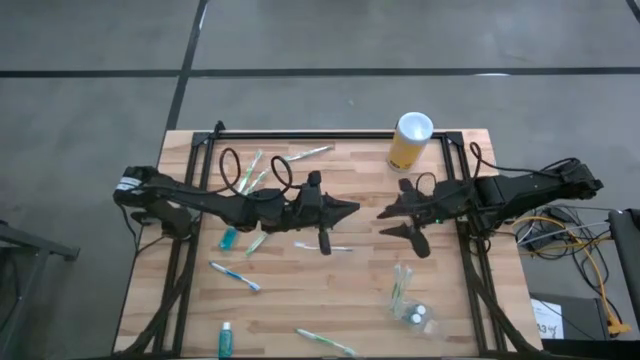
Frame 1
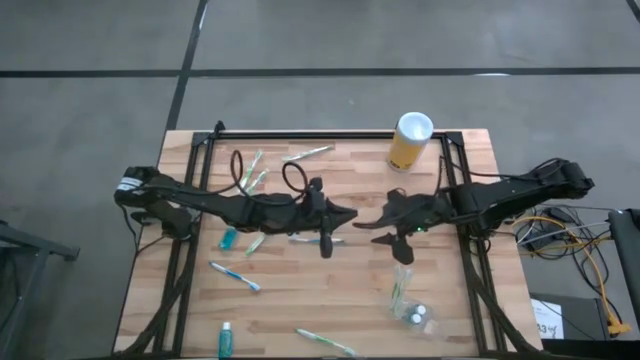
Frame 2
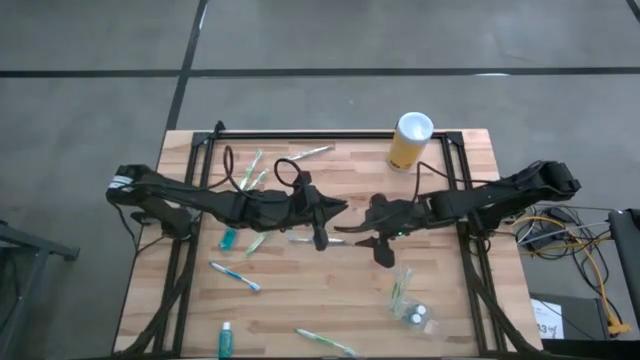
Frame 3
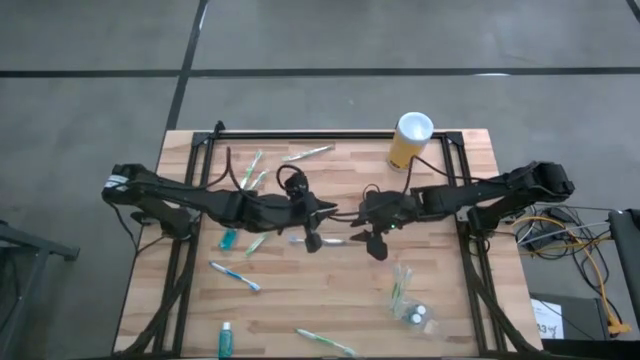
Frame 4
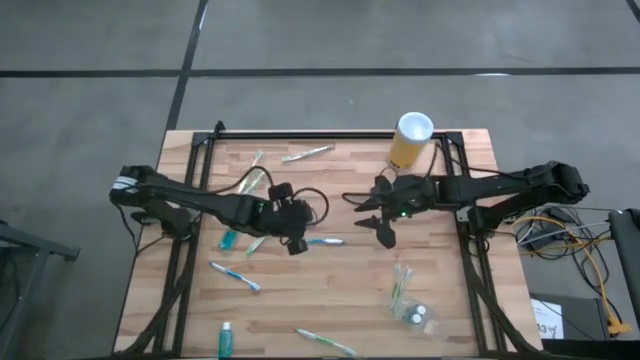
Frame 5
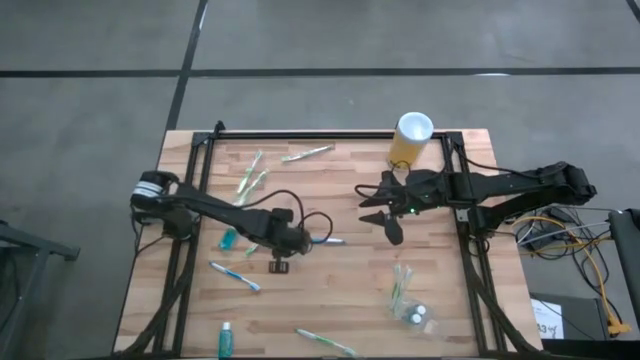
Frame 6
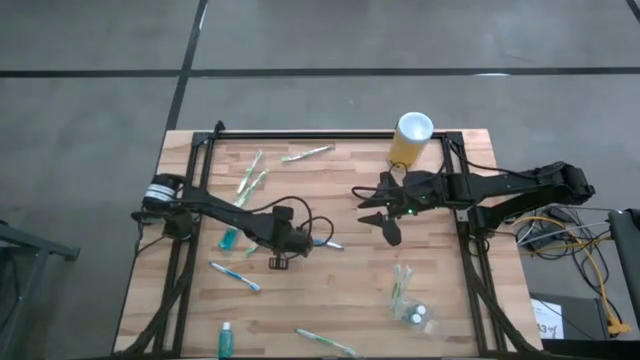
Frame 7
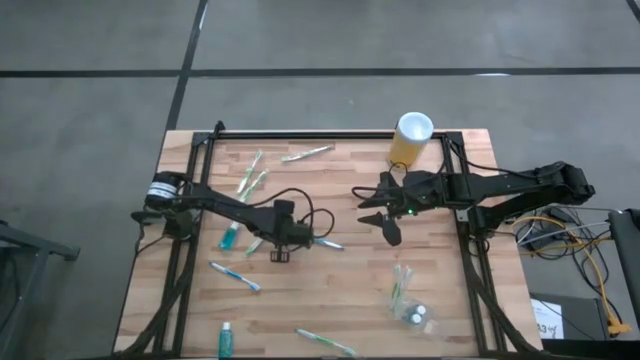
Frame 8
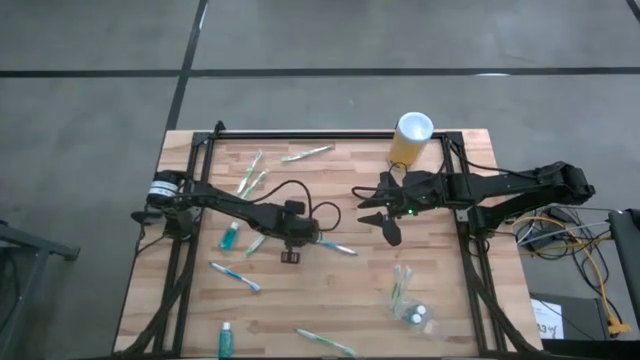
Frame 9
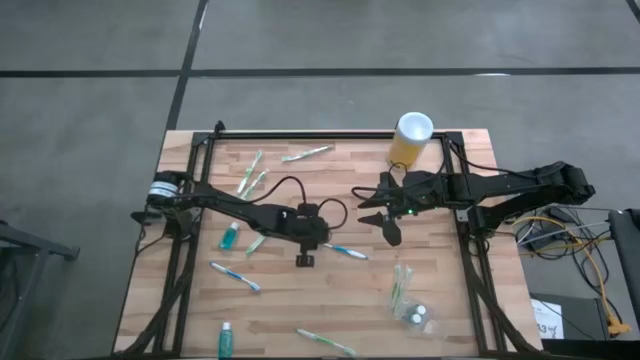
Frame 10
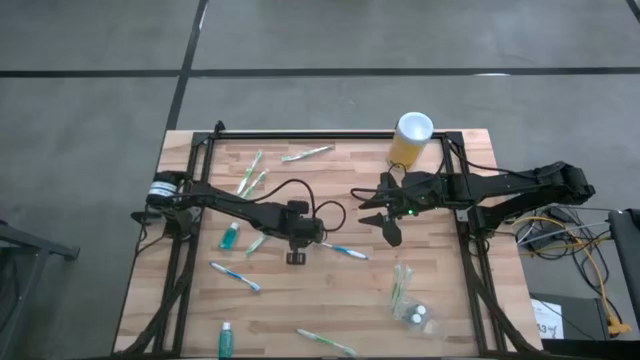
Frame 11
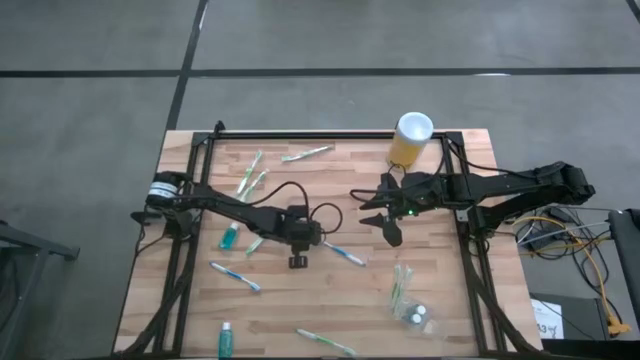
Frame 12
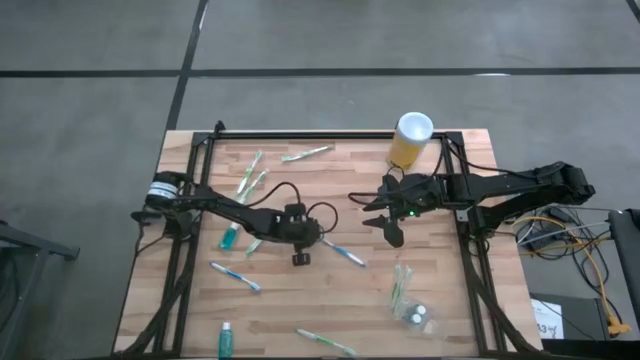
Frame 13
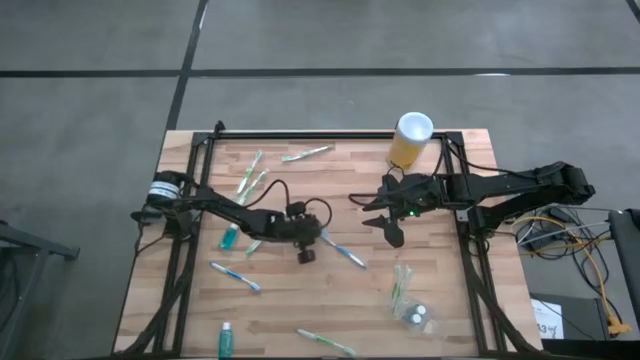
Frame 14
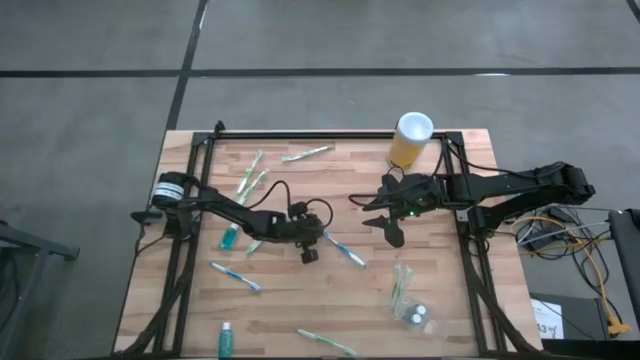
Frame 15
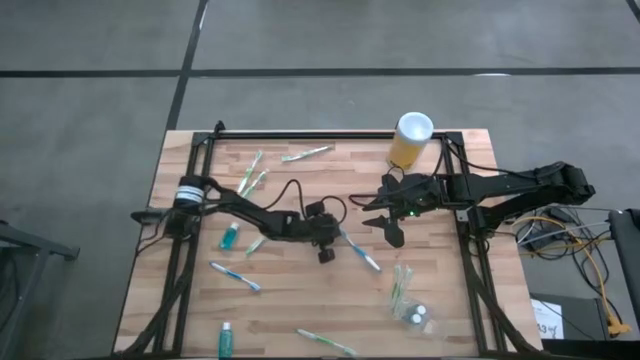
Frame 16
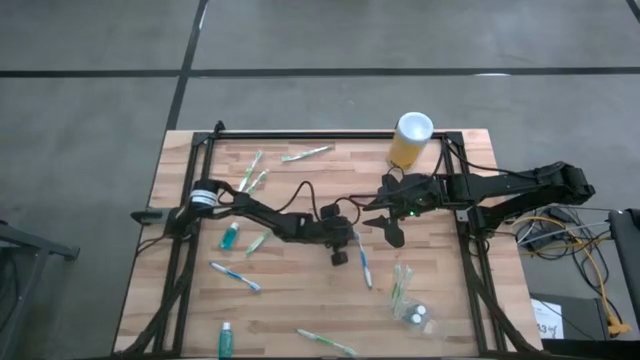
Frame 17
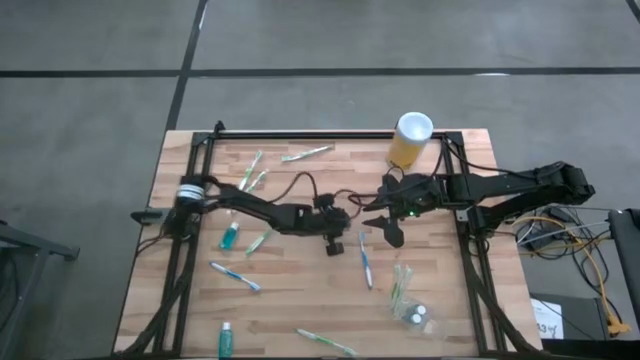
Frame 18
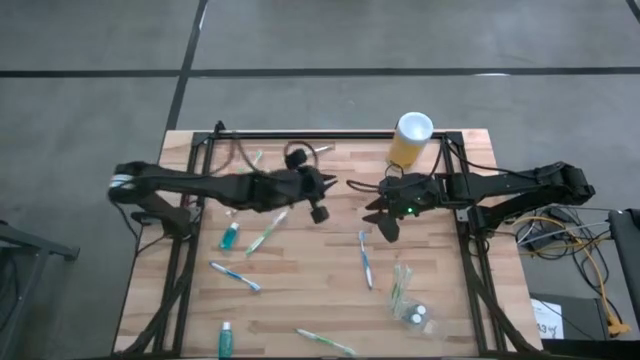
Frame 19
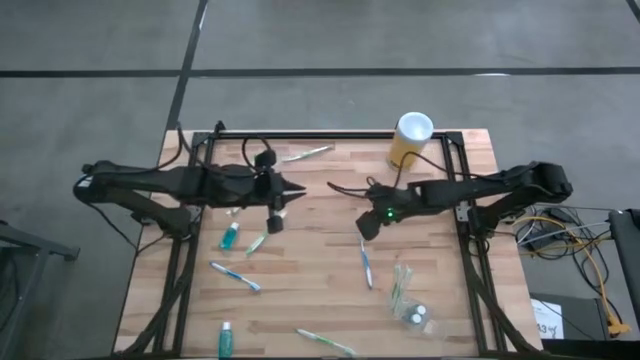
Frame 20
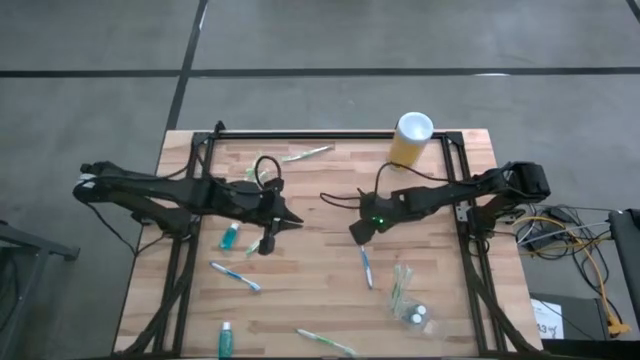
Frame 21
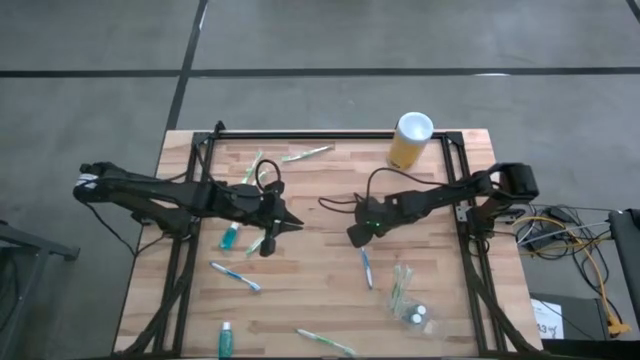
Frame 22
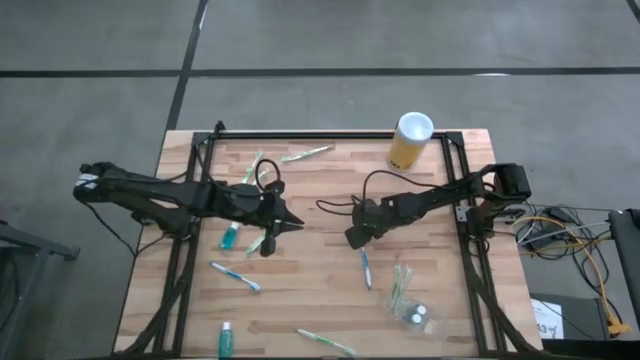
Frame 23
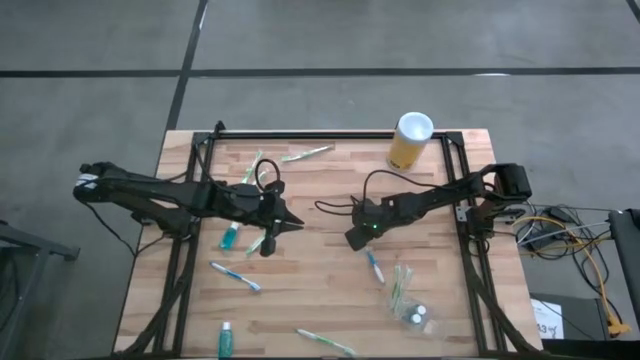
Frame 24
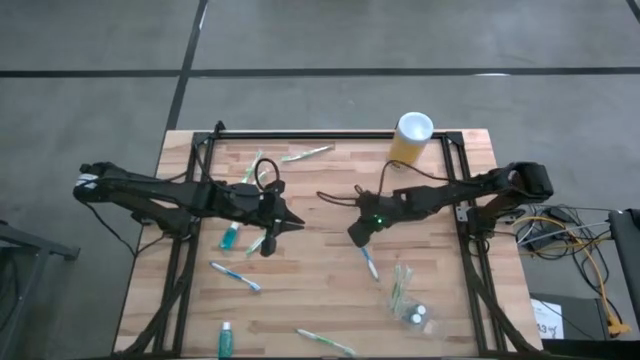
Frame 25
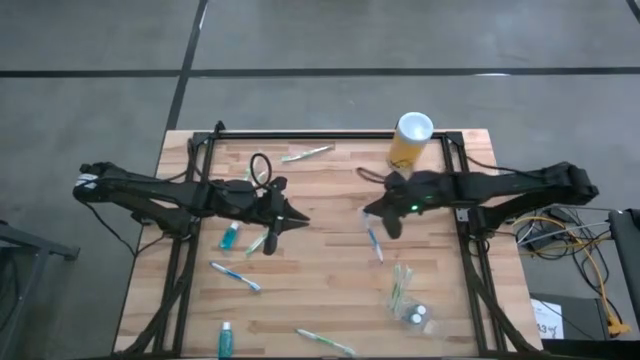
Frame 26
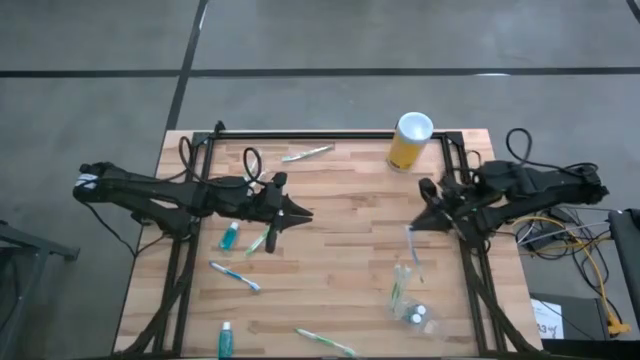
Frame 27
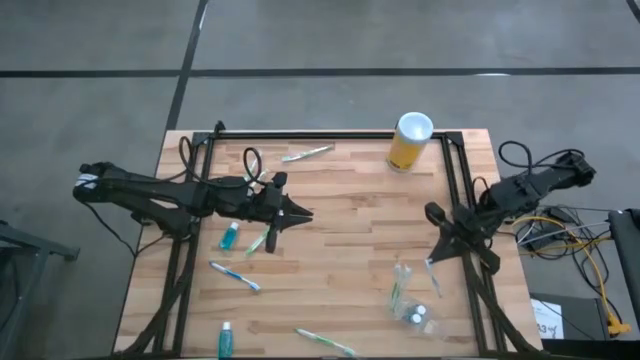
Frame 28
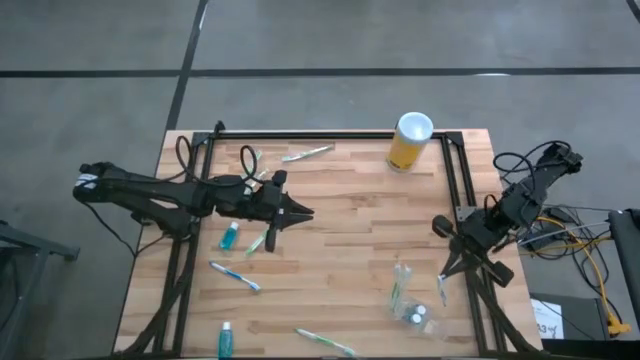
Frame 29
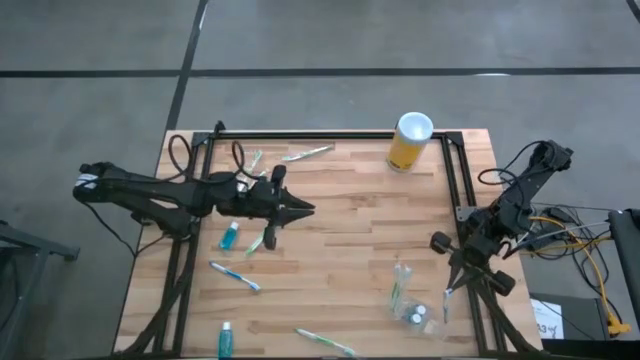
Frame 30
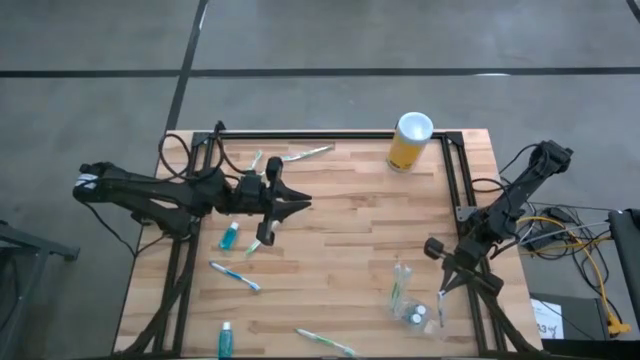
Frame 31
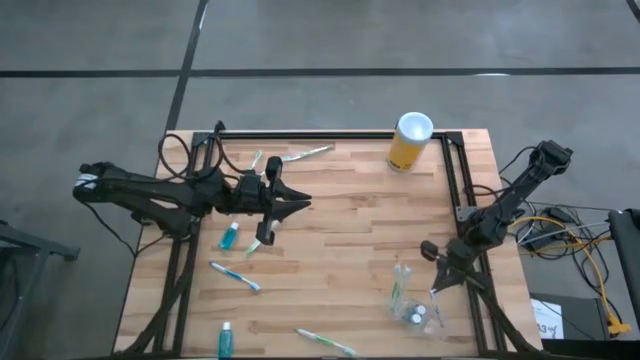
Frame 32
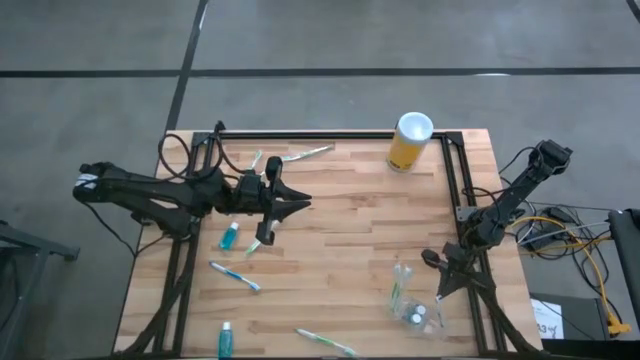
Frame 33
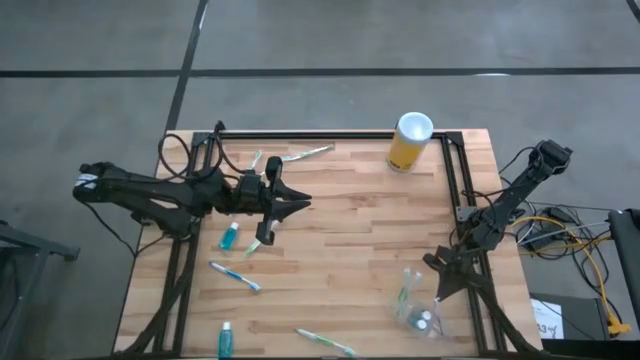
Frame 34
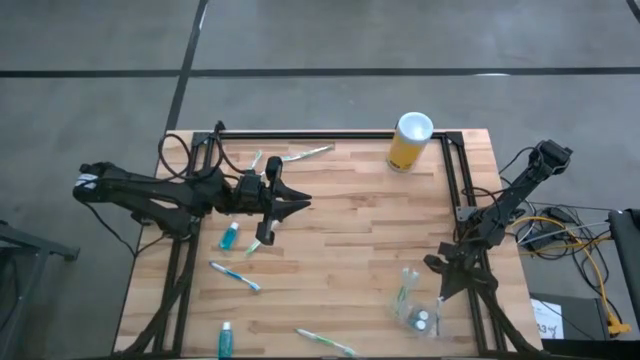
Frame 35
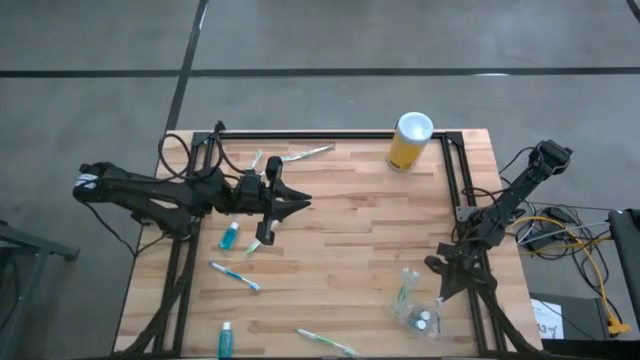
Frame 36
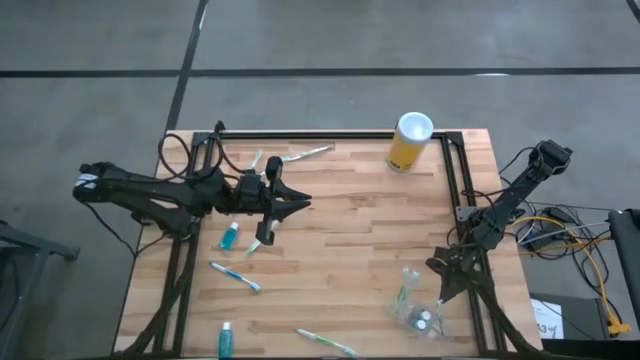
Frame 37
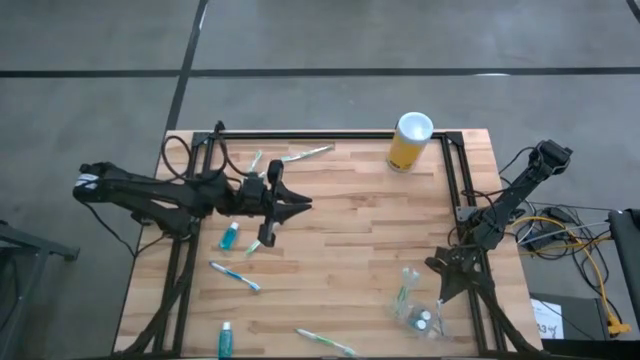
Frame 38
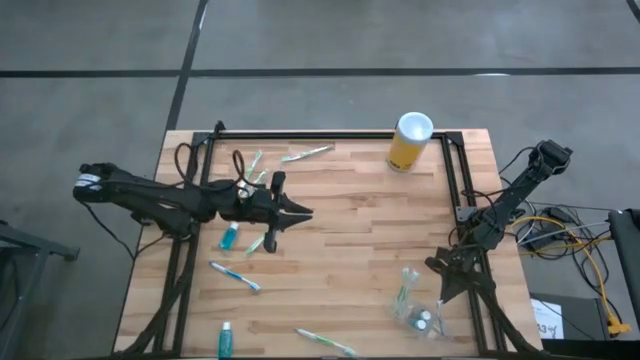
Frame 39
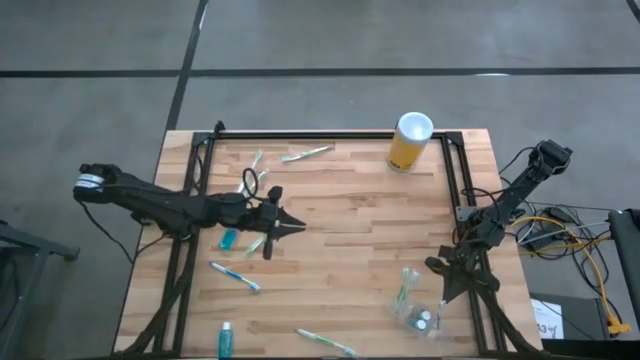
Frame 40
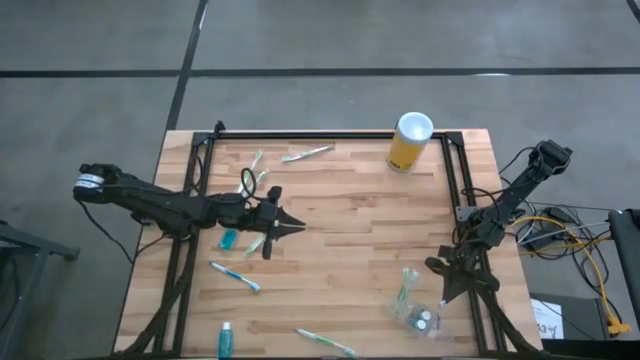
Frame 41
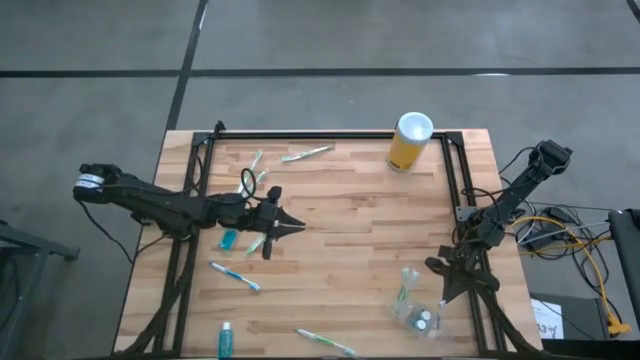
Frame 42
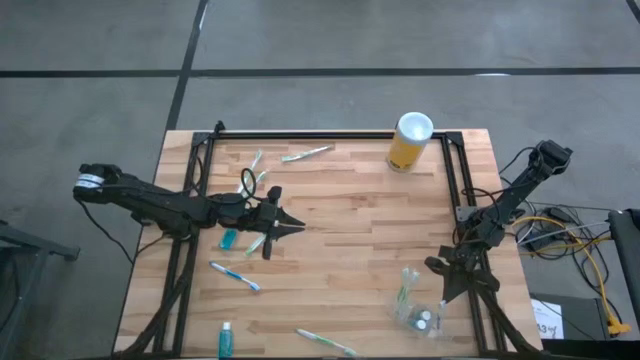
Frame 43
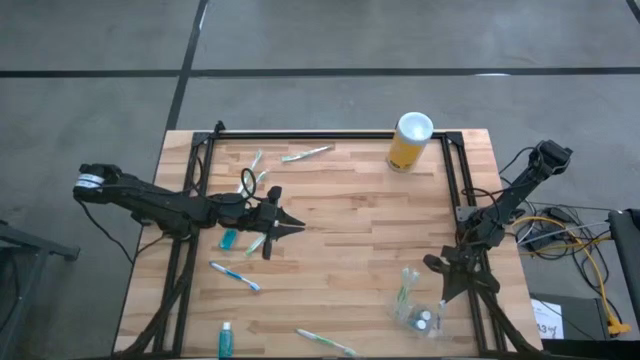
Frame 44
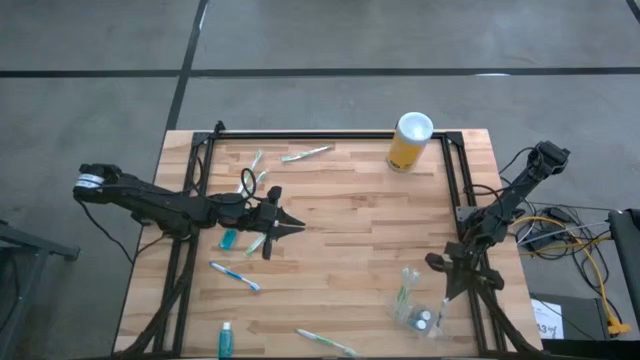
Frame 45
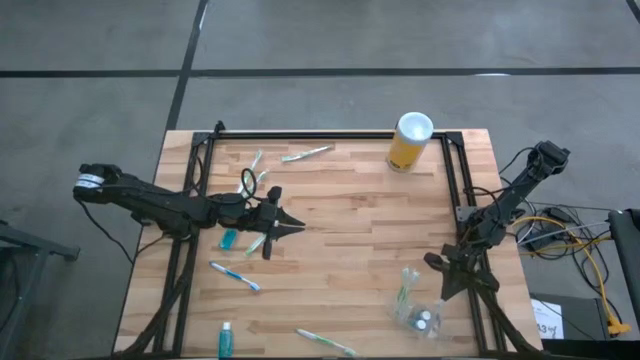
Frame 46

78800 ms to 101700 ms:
Task: Pick & Place toothbrushing station
Put the top blue toothbrush into the transparent organizer
